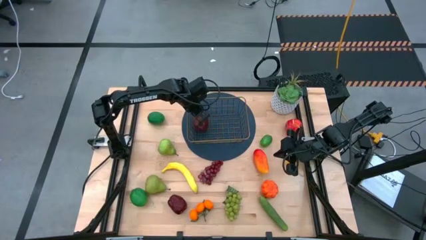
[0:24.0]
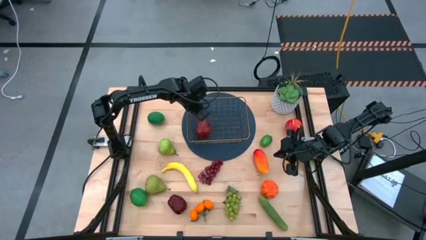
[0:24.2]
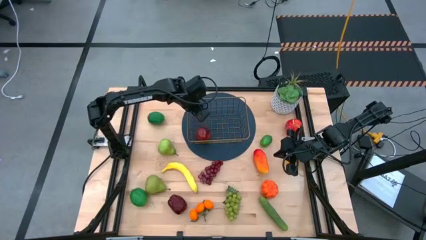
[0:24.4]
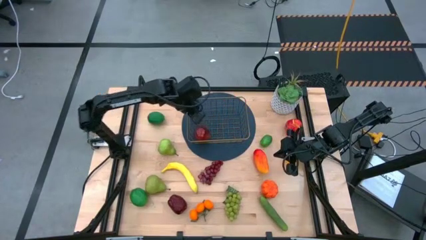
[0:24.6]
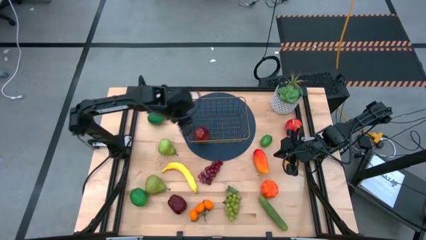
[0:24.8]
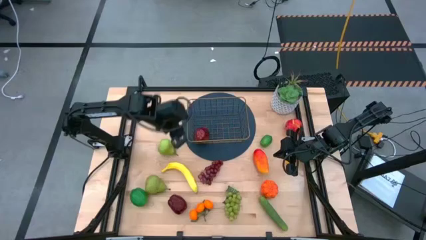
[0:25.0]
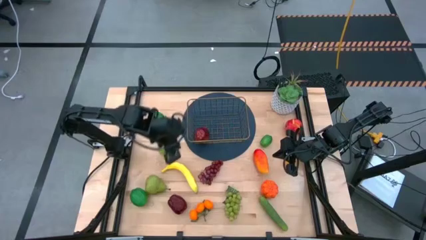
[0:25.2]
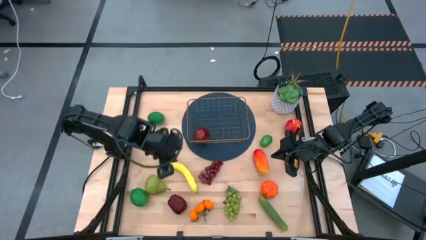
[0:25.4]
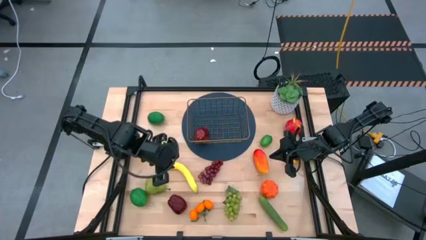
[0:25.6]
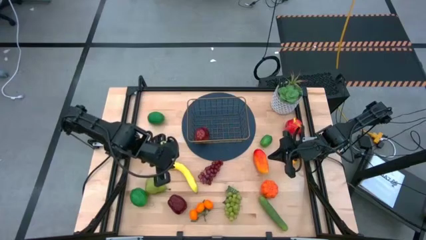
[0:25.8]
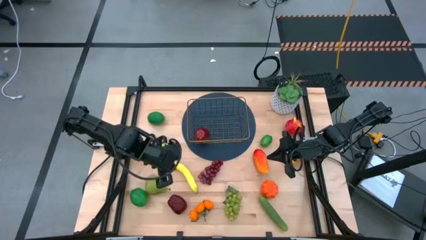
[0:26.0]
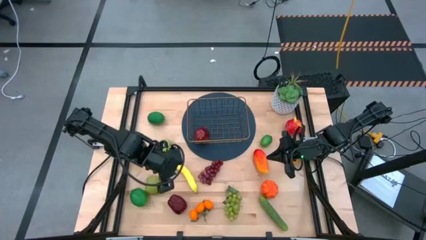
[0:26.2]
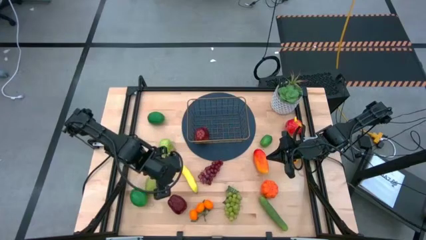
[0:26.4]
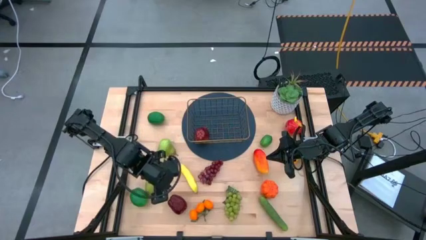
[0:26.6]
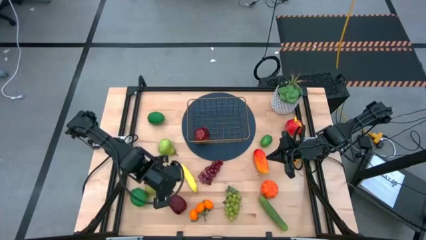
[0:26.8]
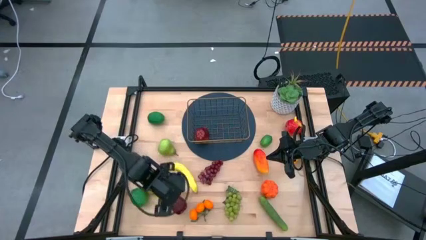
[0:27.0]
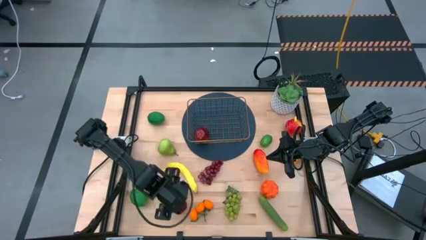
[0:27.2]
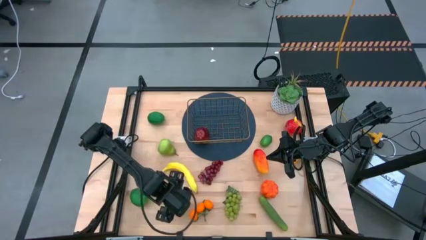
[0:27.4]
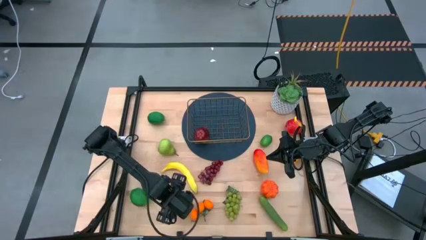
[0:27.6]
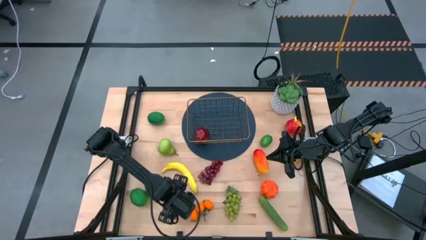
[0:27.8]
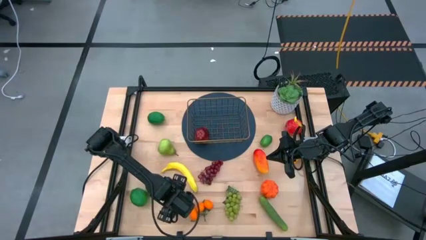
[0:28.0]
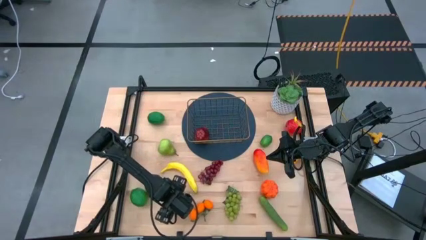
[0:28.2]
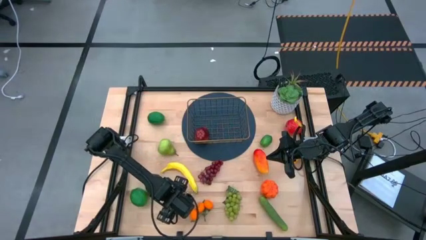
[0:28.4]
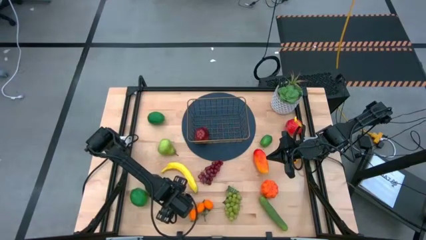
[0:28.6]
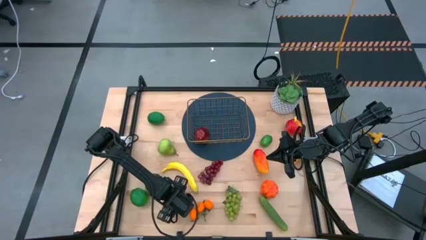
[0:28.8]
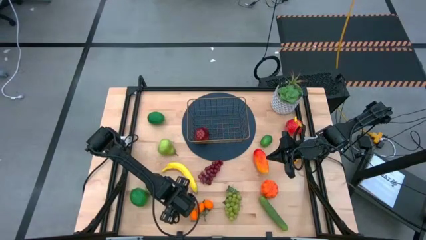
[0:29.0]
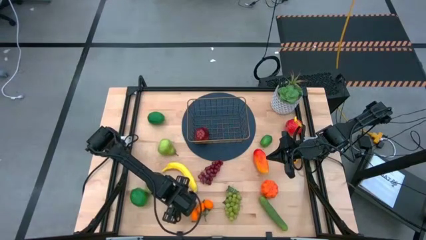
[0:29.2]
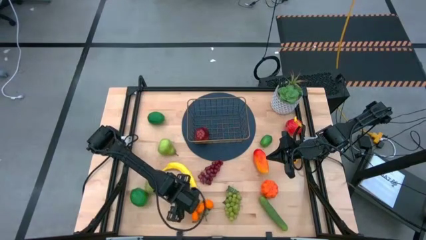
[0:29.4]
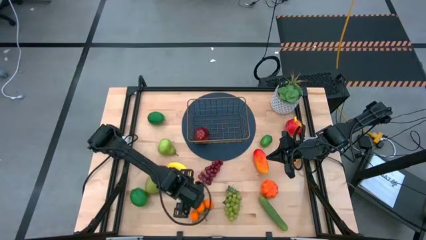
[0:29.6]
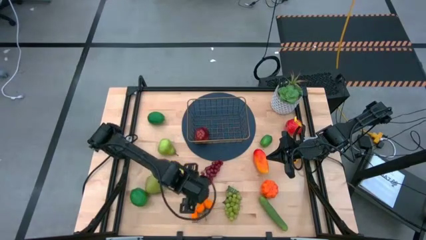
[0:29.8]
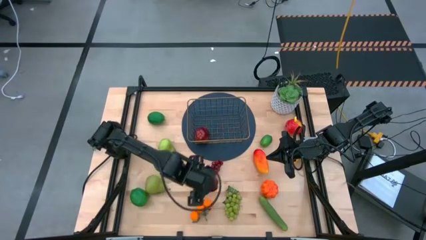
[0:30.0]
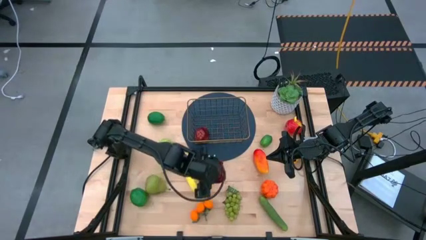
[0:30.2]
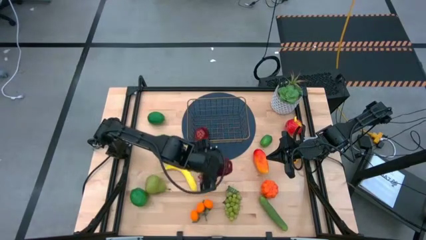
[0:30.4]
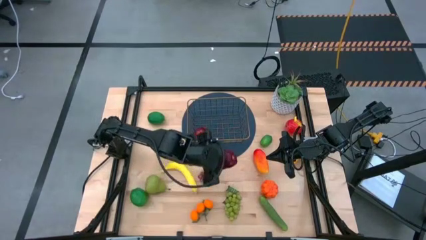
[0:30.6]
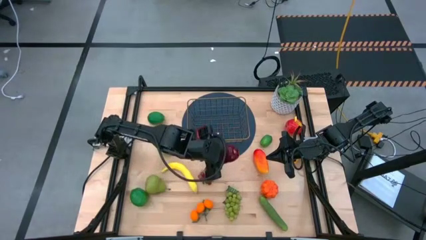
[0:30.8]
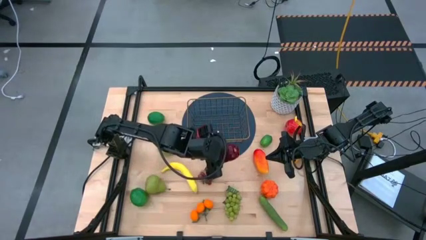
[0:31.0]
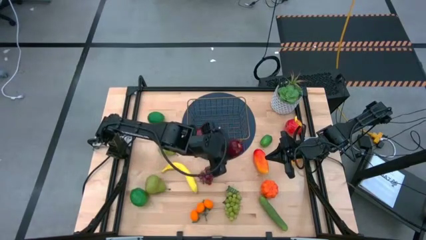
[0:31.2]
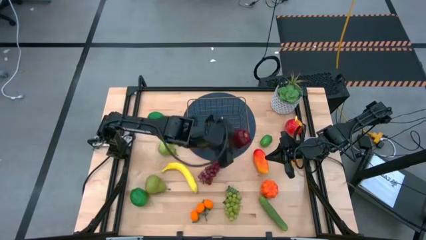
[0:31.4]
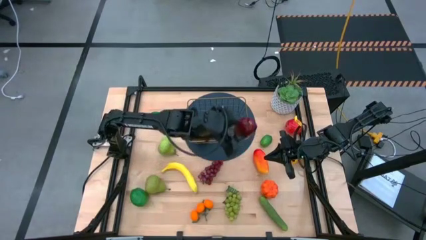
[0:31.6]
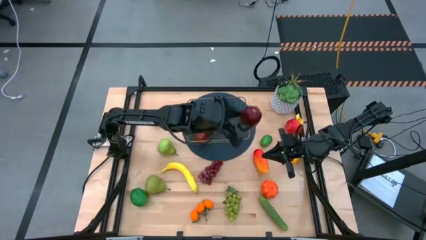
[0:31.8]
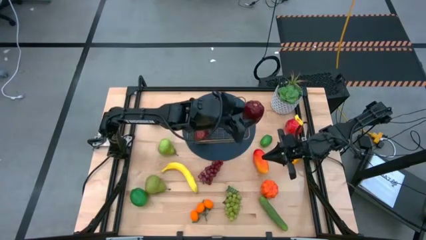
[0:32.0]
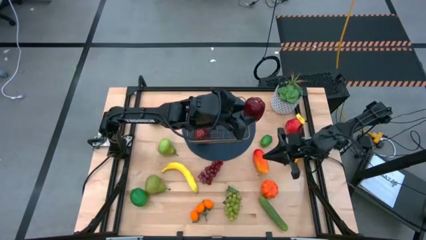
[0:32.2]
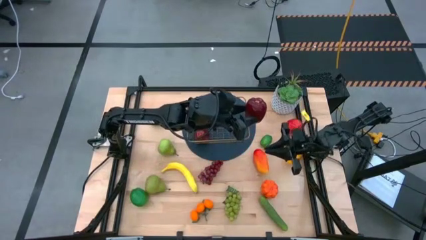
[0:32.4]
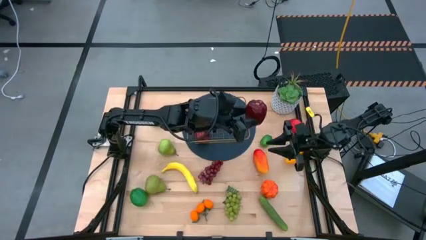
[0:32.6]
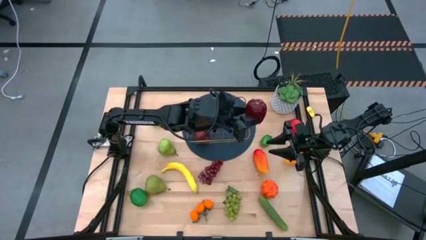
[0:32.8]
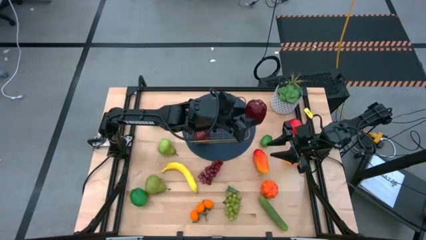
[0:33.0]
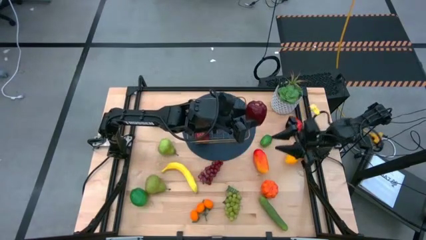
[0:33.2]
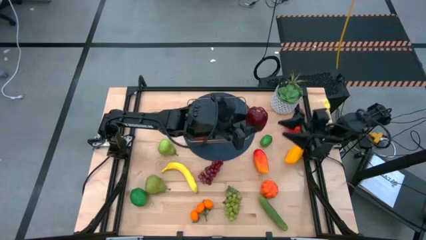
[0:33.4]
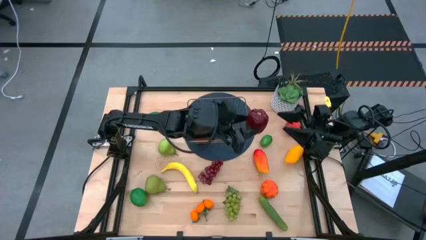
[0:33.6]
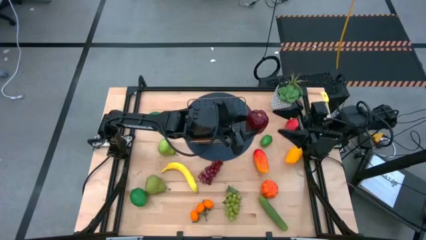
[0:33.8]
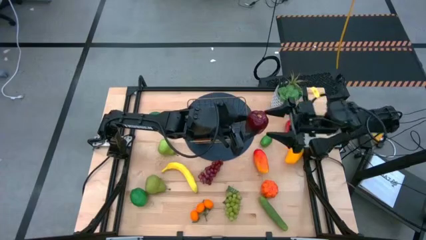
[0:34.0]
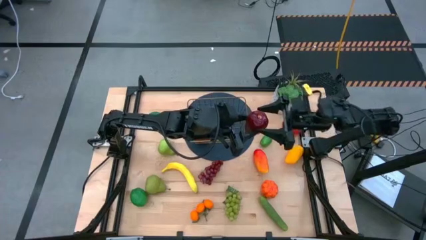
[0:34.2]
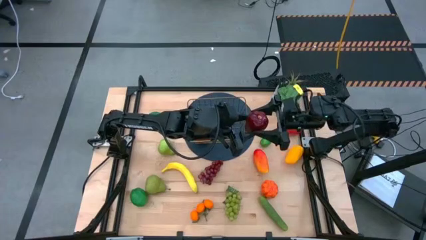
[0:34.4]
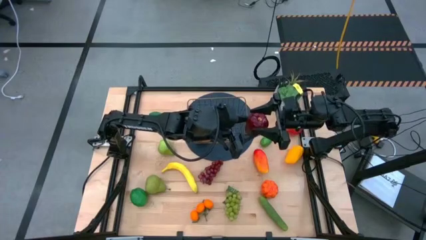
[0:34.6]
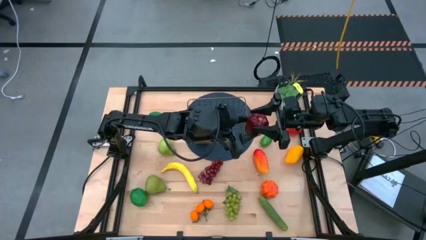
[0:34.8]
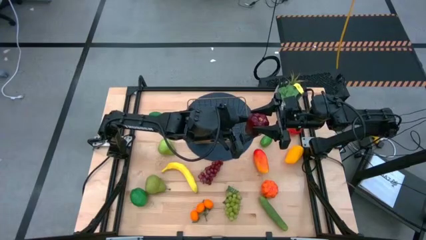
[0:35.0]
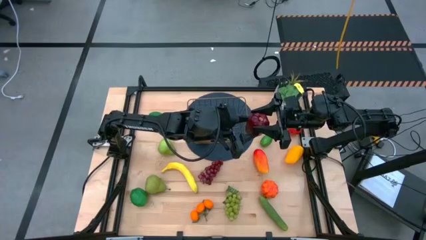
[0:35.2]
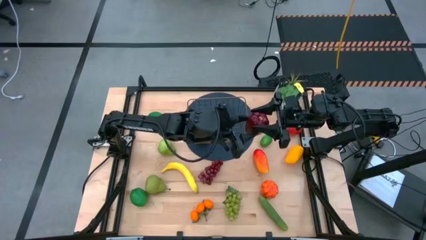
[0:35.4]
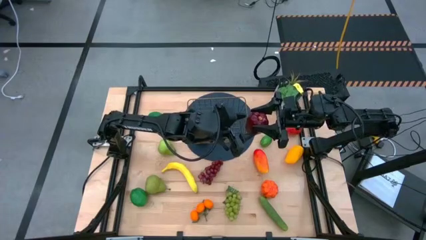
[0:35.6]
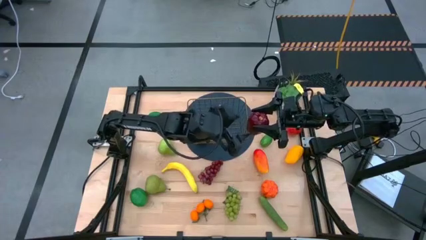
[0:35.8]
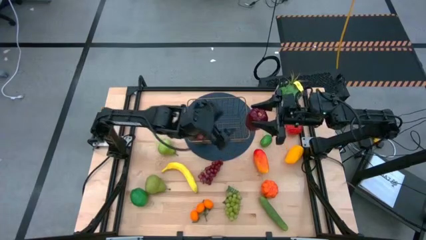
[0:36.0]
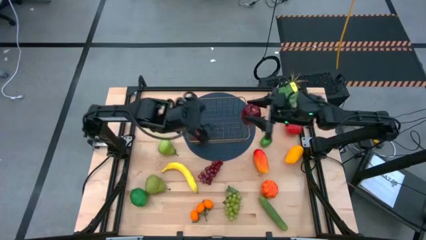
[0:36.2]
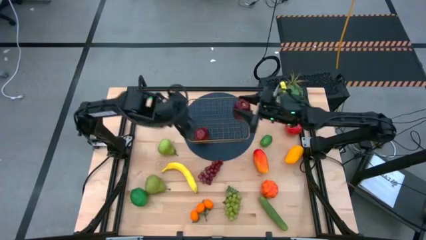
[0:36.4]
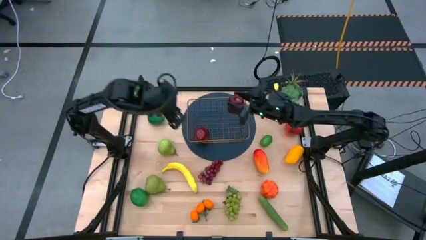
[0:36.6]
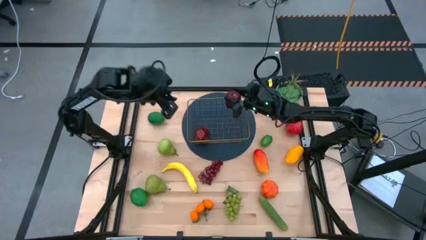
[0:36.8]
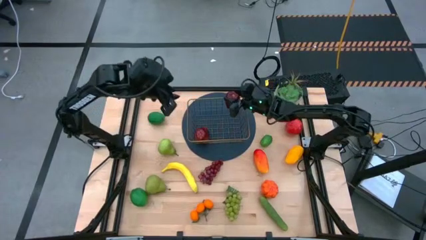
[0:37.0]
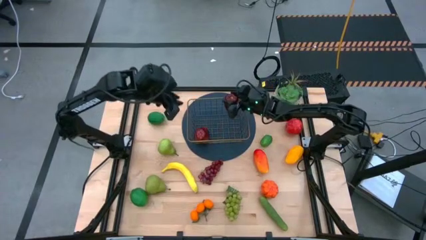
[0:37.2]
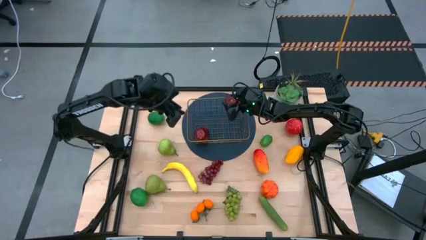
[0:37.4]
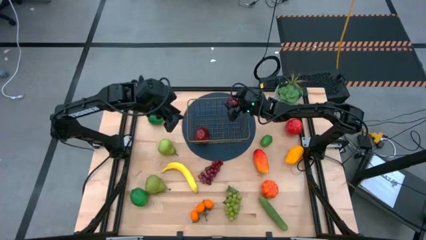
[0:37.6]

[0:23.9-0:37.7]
Task: Build produce basket
Put the dark red apple into the wire basket

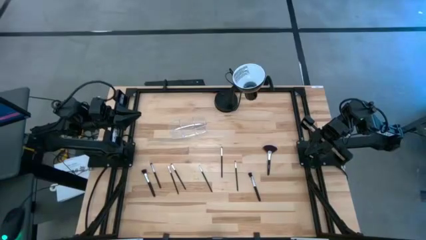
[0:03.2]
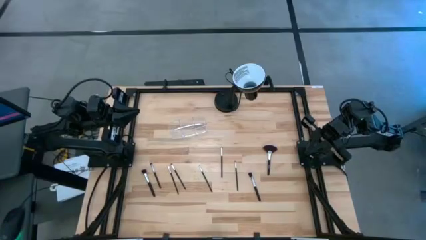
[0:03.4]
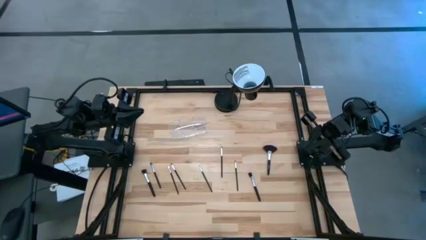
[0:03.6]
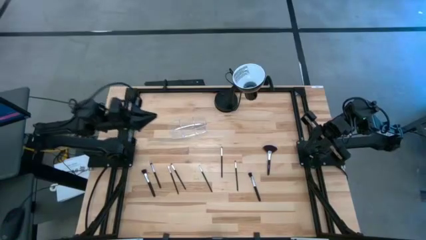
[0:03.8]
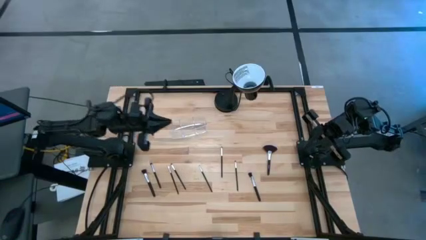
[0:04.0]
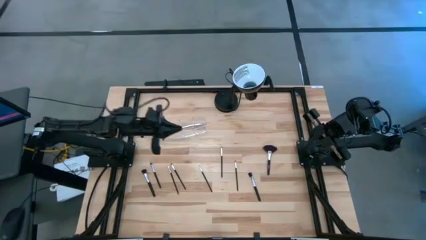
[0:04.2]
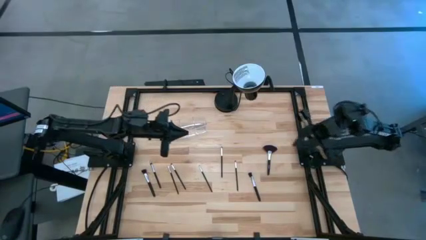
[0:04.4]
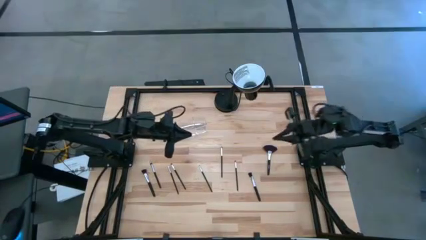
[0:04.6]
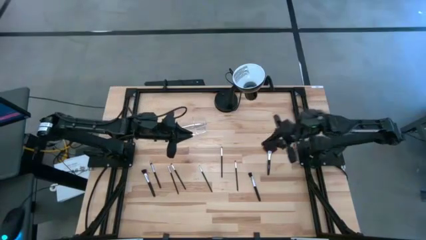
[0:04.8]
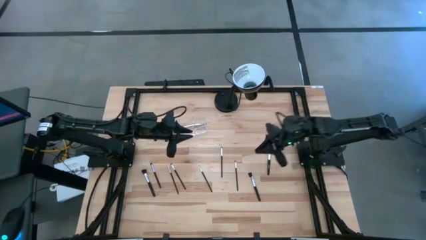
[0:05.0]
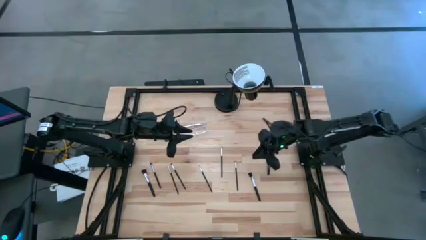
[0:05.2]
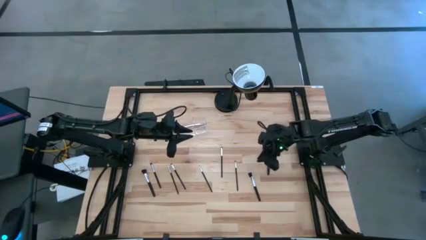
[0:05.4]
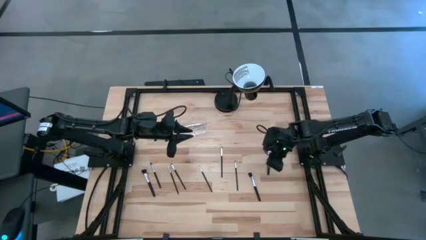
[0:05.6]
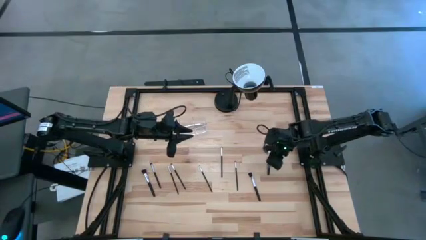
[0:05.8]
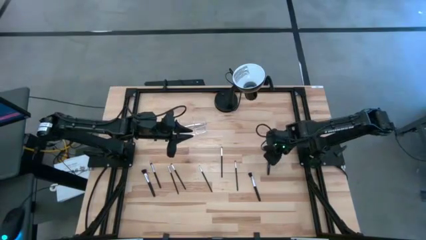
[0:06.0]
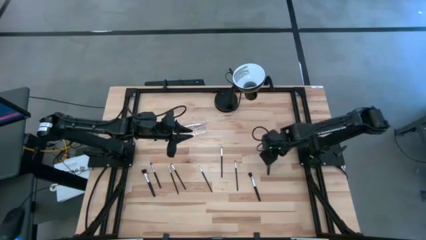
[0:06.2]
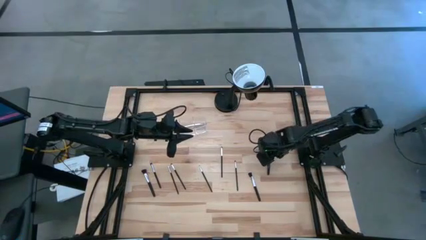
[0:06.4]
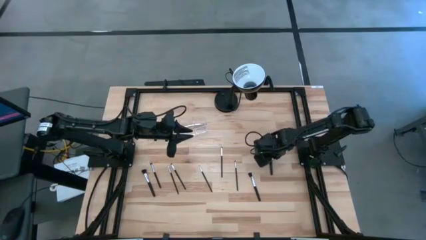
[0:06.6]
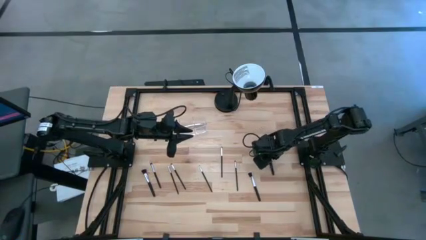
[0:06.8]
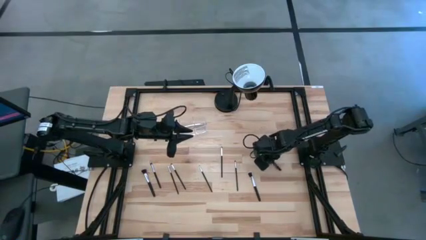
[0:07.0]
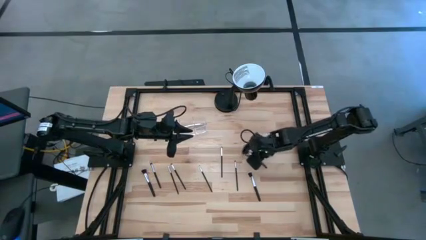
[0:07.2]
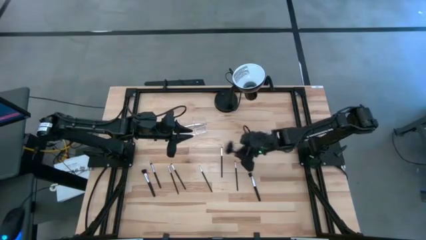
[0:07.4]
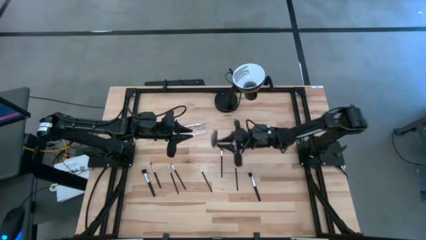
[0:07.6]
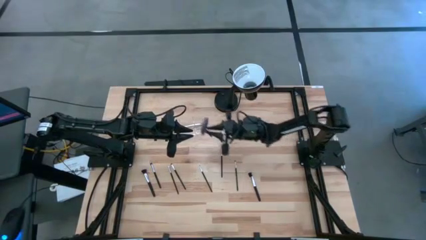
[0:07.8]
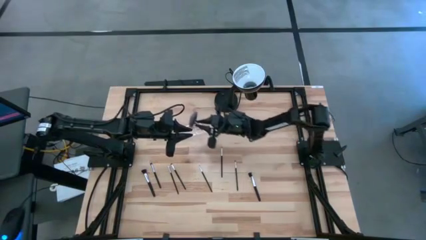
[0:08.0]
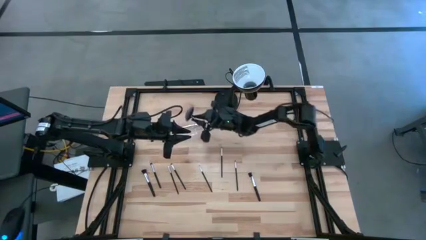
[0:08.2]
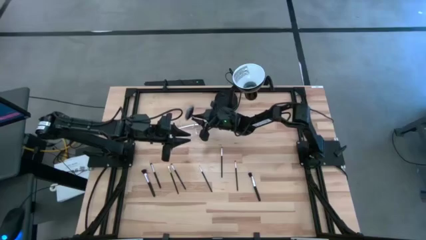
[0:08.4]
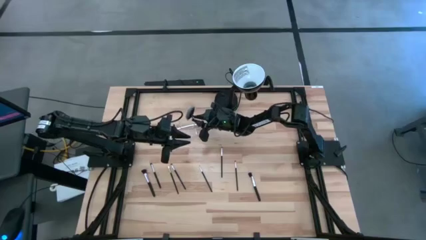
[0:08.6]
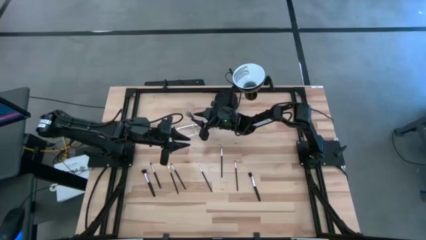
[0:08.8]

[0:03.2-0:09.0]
Task: Put items in baskets/containers
Put the black highlighter brush into the transparent organizer
